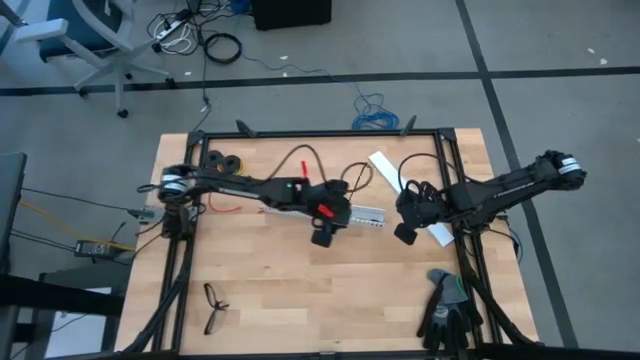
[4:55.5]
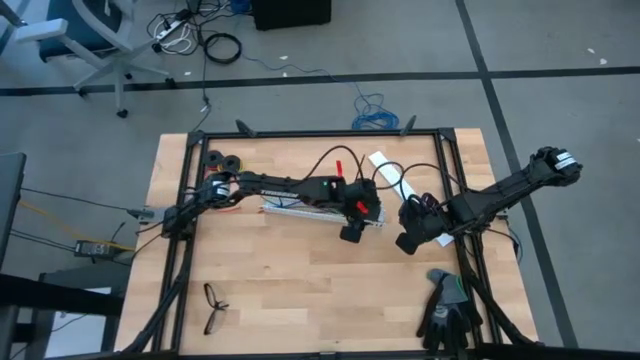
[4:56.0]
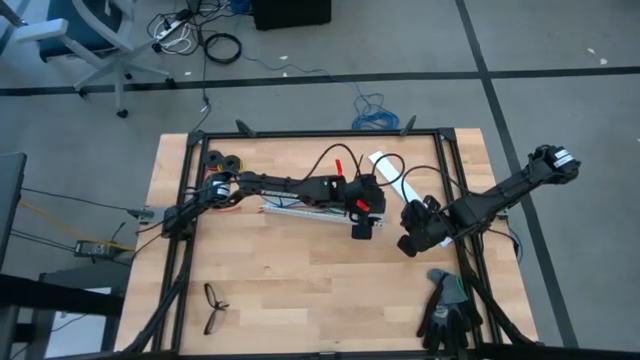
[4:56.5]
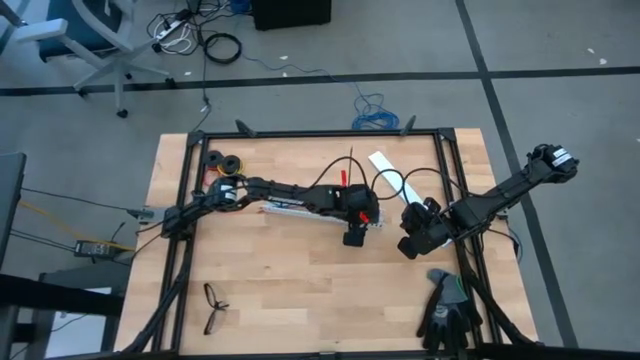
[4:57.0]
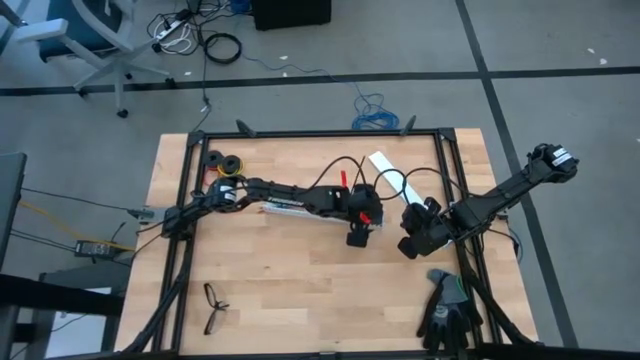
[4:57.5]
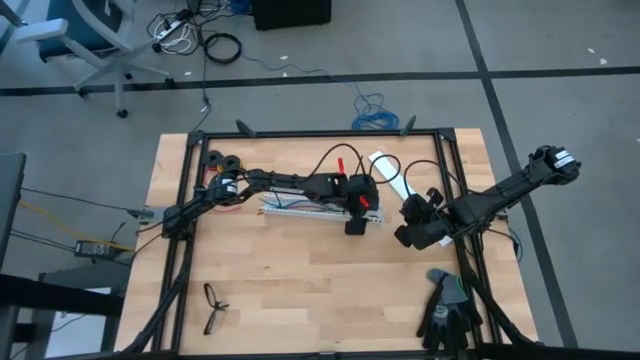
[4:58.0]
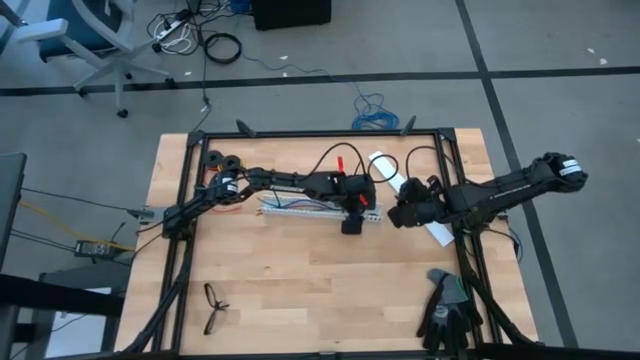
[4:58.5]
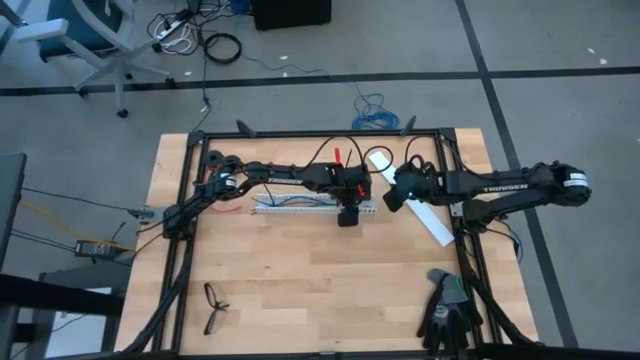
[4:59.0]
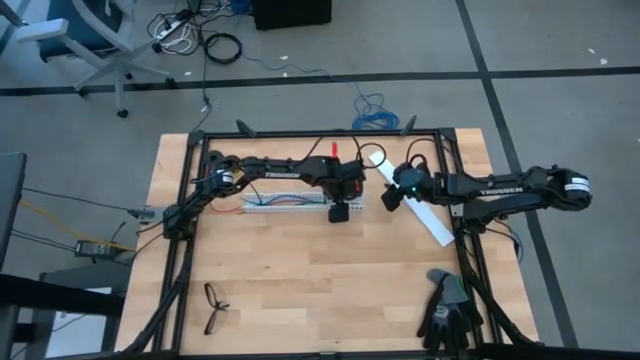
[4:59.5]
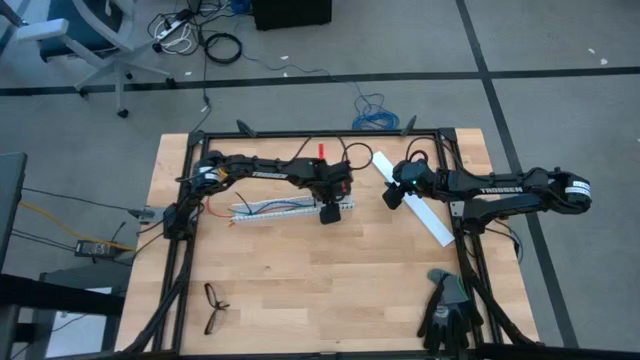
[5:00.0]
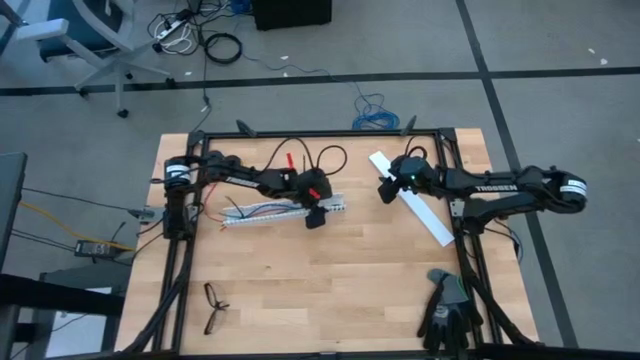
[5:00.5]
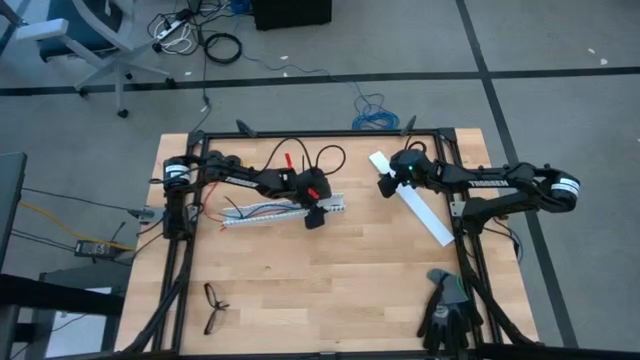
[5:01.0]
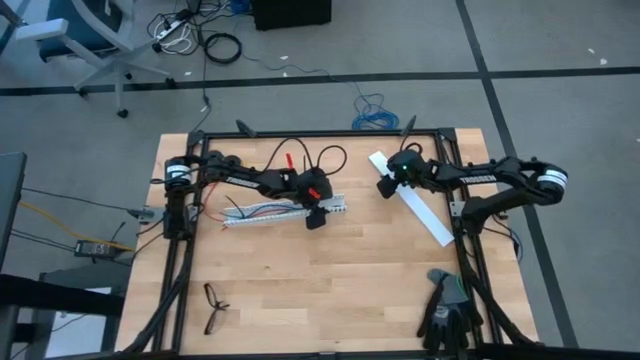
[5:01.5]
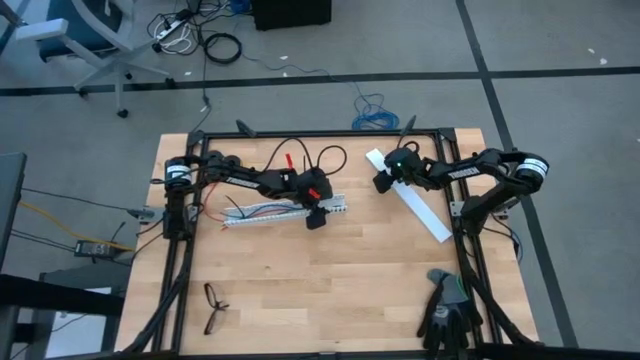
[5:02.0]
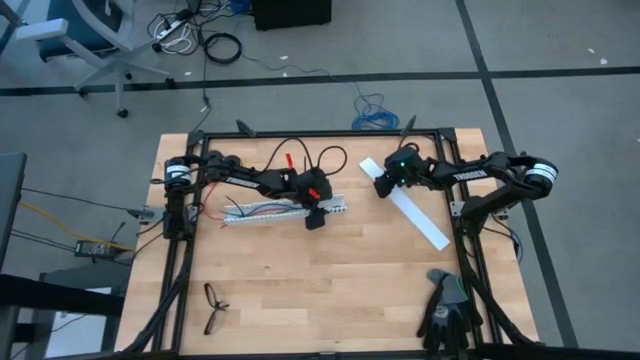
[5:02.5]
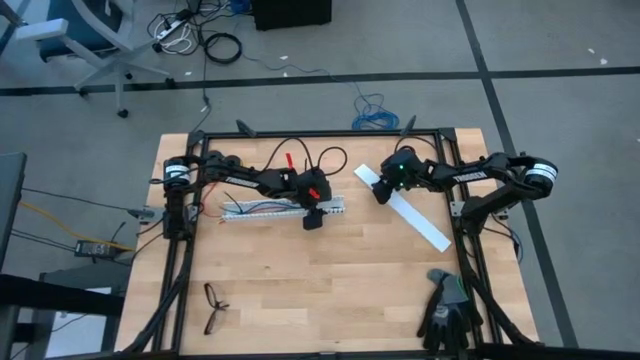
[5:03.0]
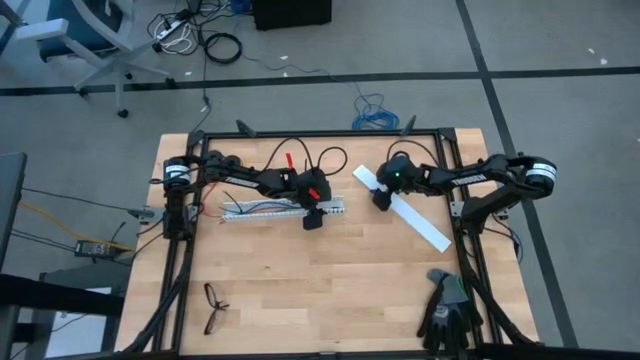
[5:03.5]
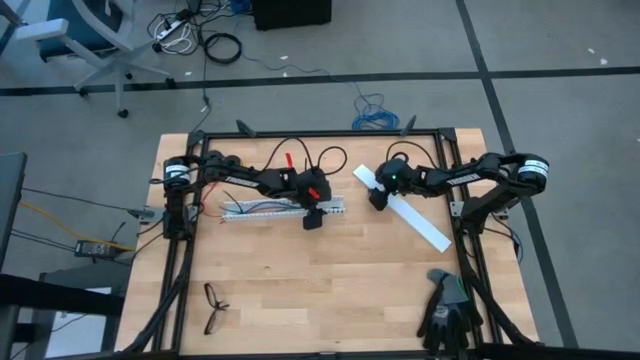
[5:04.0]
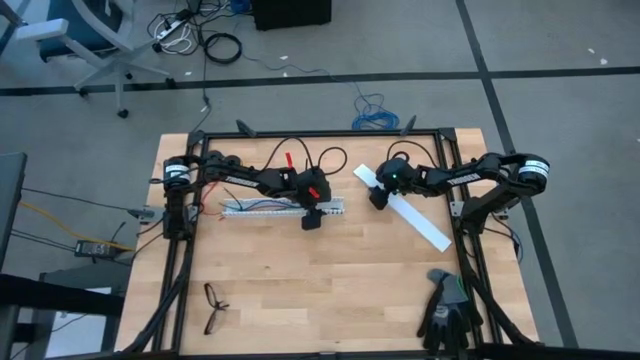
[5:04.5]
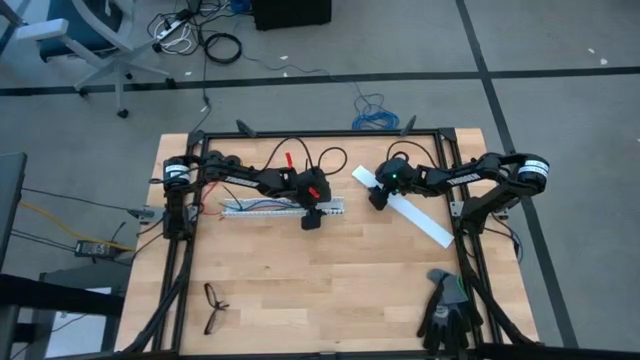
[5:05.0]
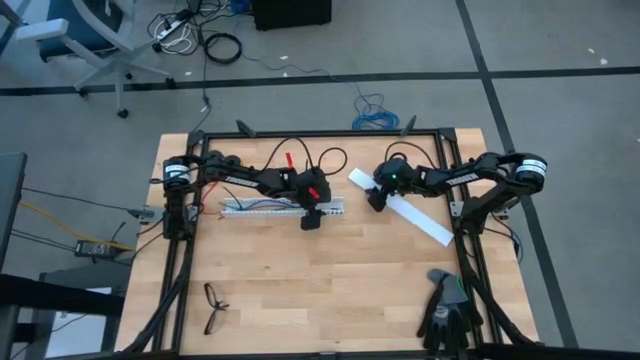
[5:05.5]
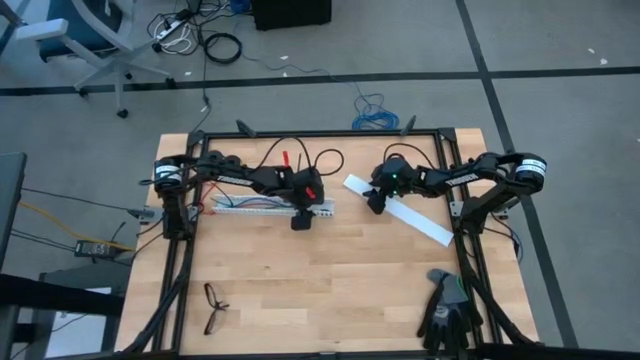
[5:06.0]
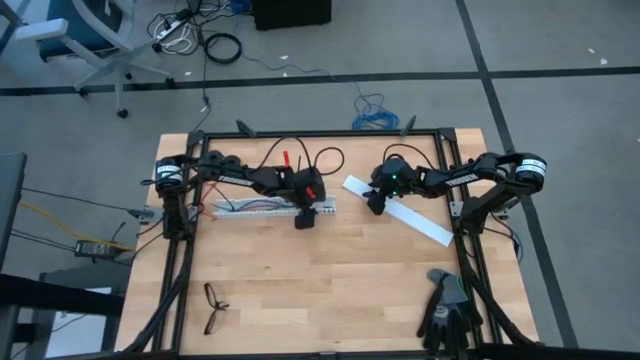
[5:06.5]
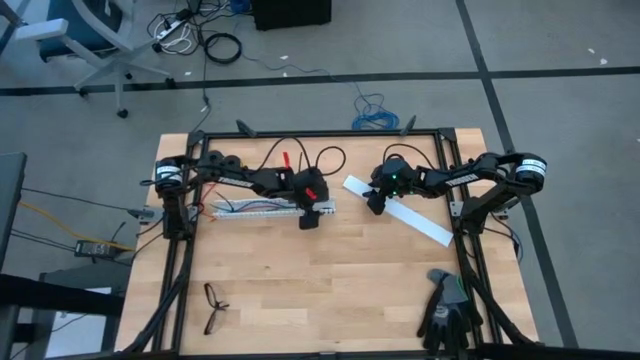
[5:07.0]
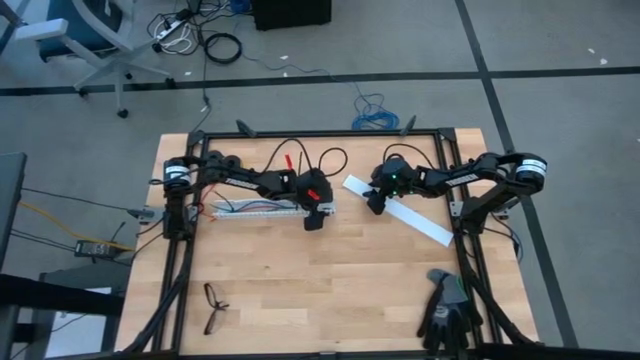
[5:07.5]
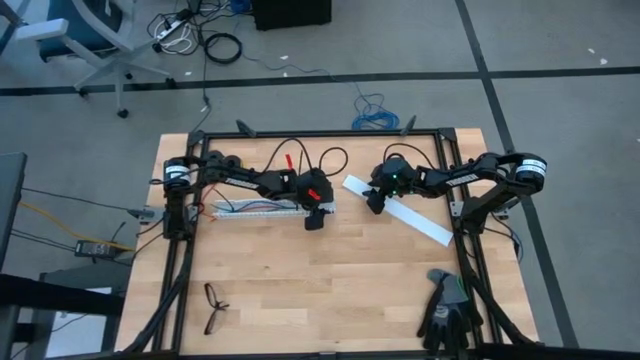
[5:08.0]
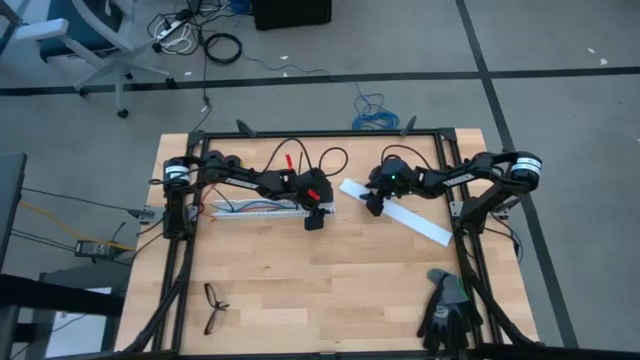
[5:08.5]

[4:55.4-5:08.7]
Task: Ziptie cables
Close the white cable duct

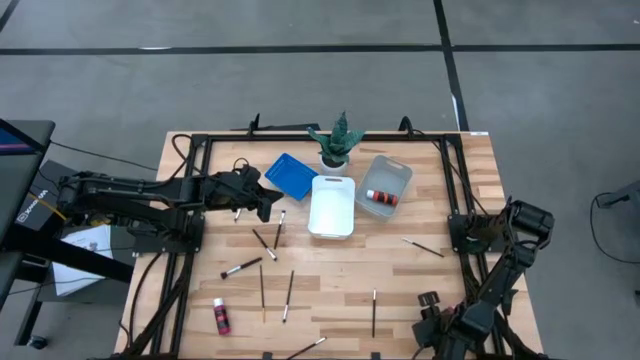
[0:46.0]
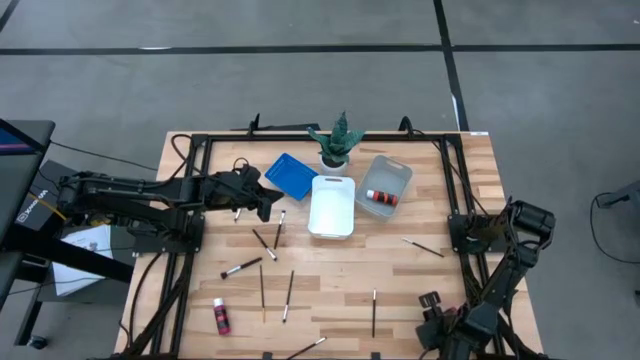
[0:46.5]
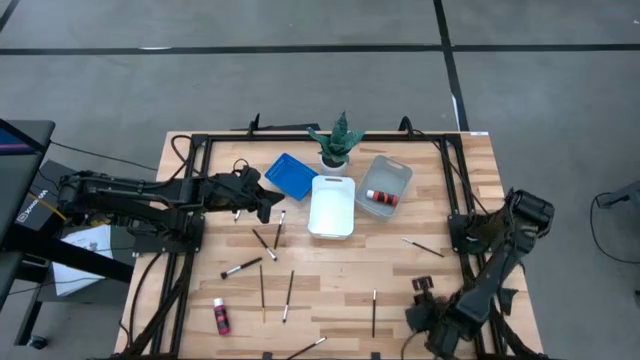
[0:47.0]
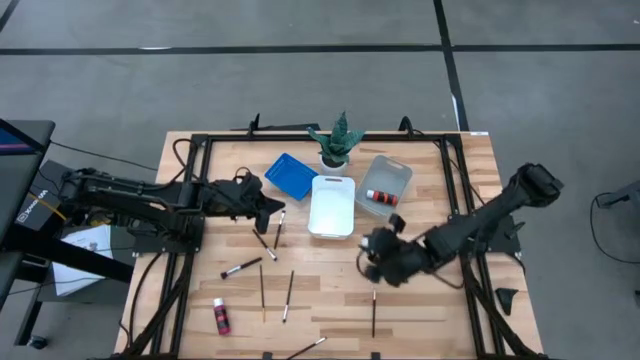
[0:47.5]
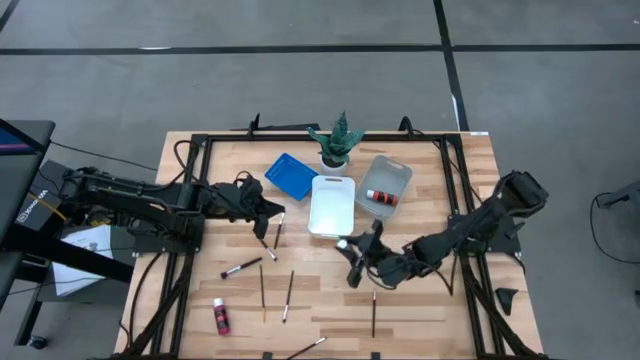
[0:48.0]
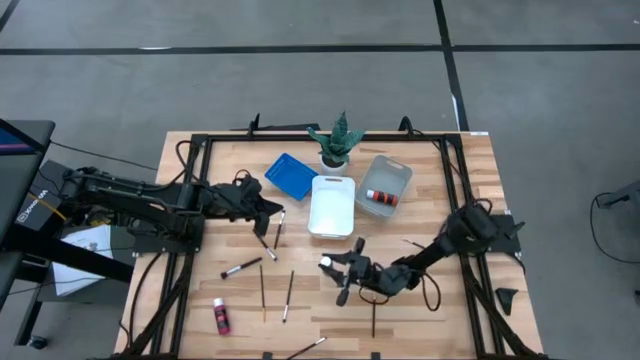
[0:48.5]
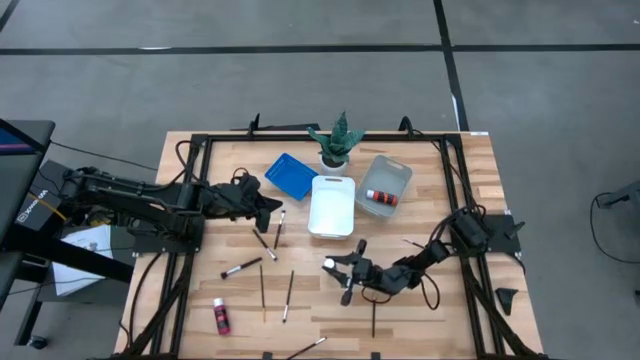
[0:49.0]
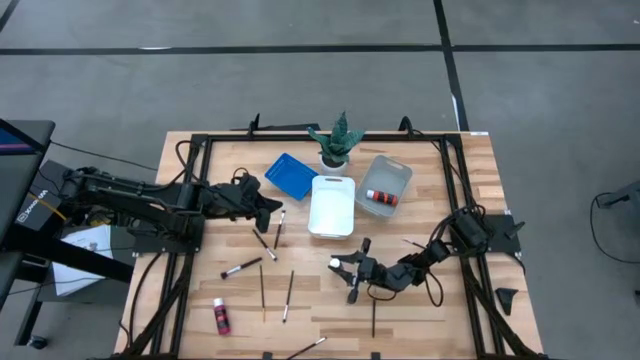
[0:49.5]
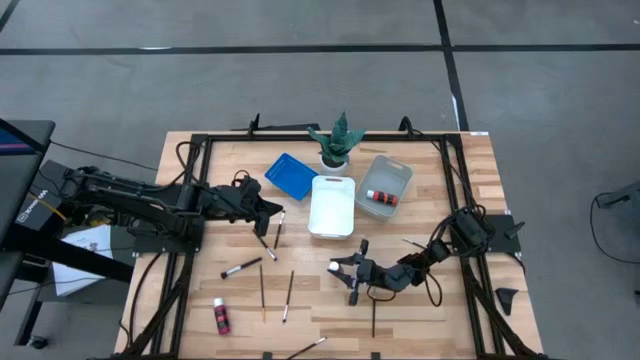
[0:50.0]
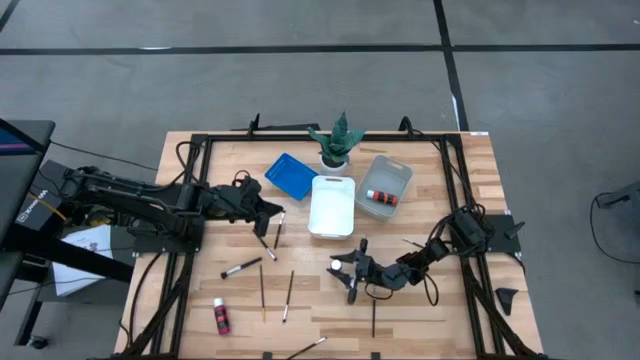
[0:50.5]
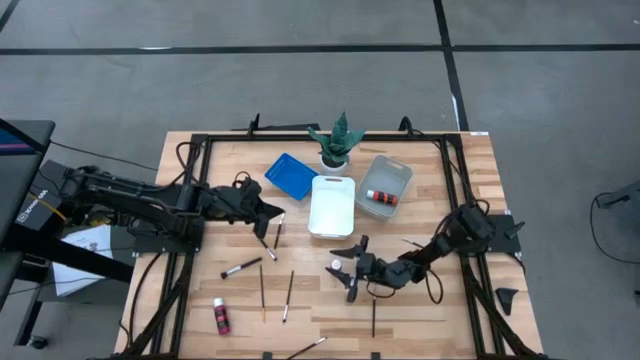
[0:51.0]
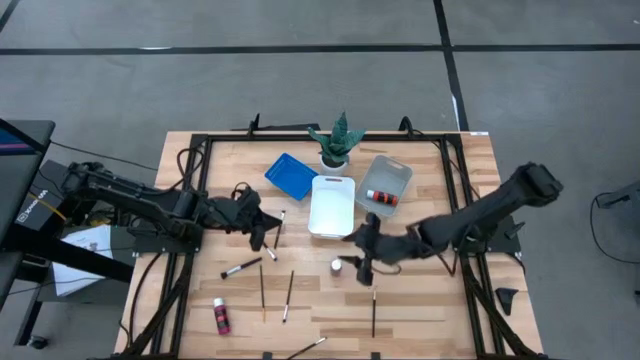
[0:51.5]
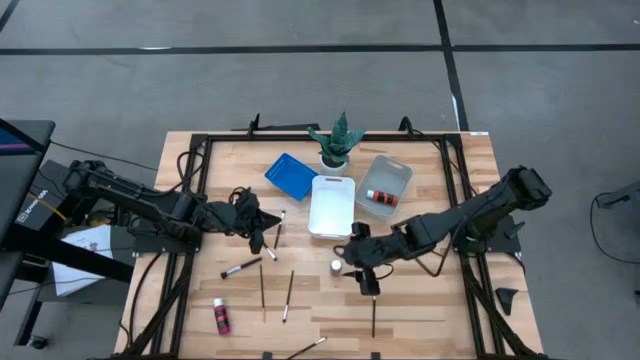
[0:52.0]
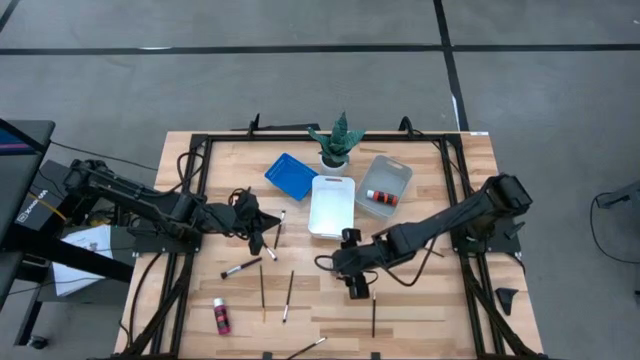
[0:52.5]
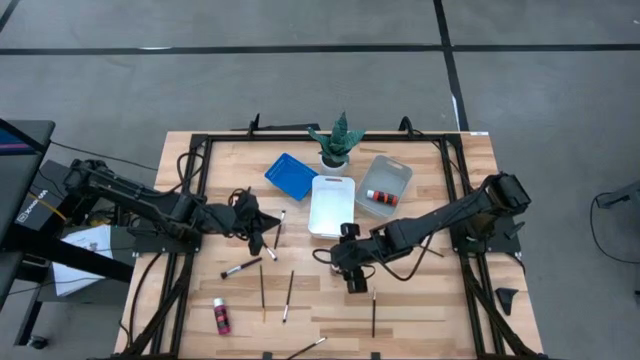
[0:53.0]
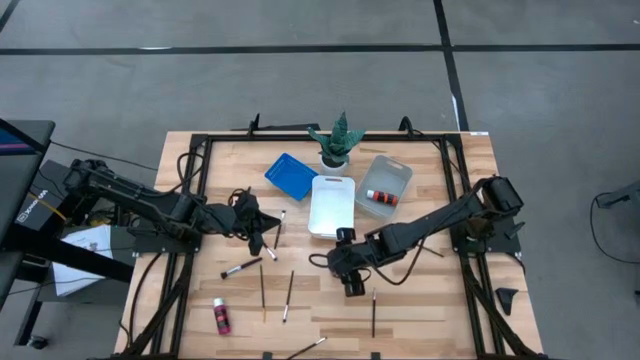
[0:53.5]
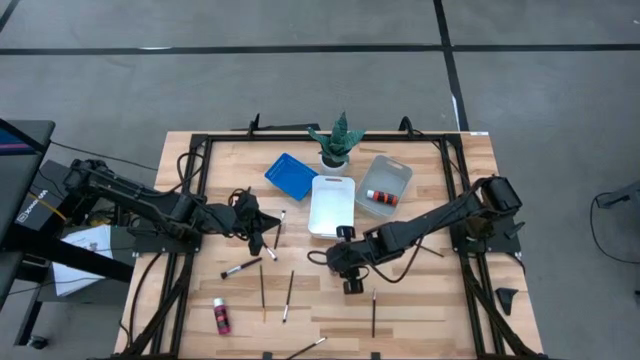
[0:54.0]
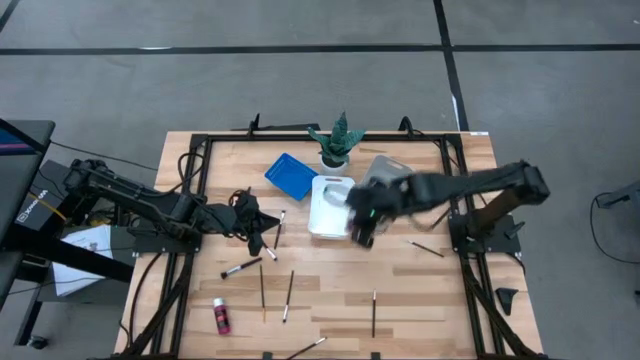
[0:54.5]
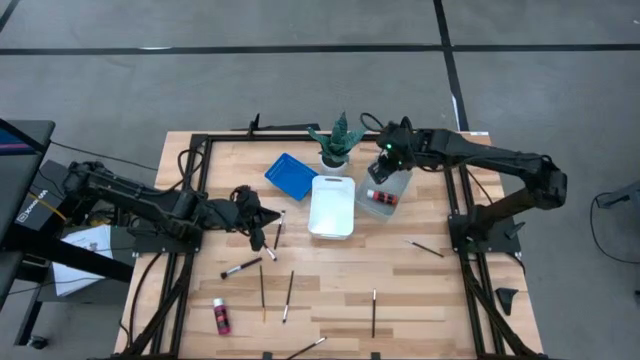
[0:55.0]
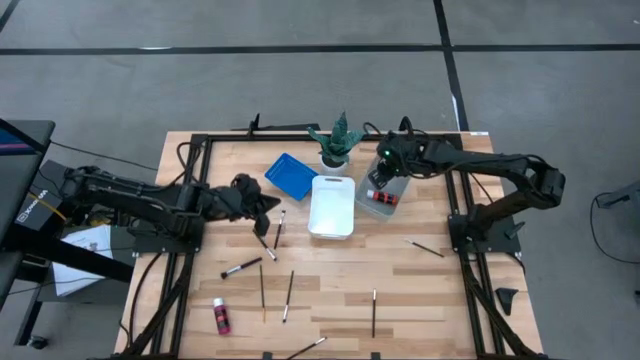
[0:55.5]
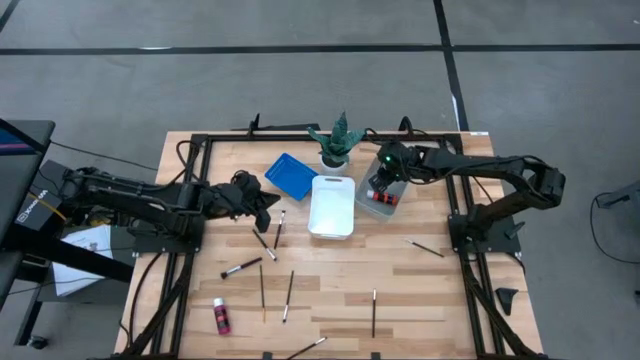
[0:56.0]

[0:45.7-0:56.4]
Task: Pick & Place Paint Supplies
Put the pink paint bottle into the gray bin
